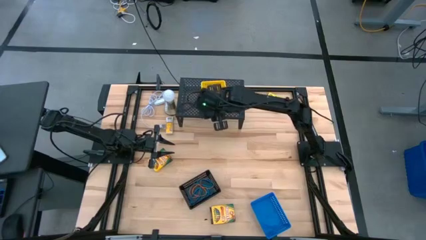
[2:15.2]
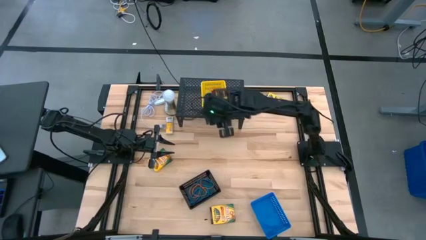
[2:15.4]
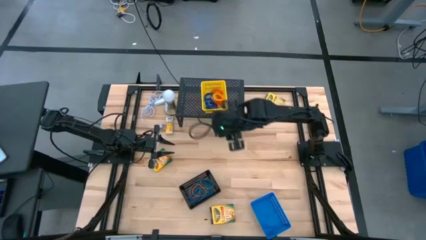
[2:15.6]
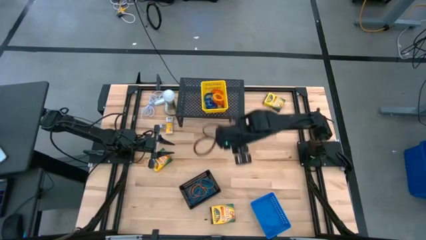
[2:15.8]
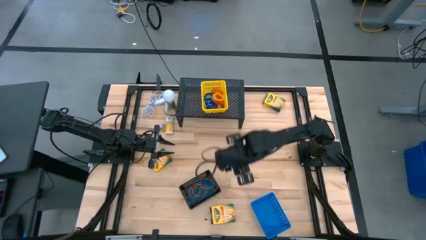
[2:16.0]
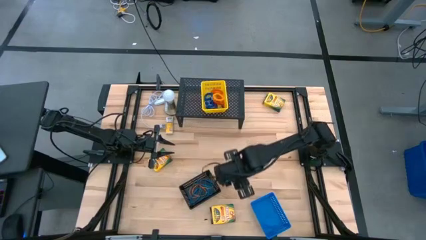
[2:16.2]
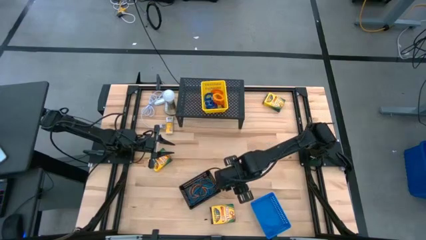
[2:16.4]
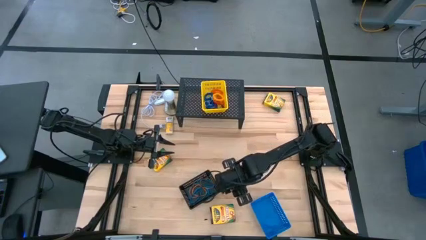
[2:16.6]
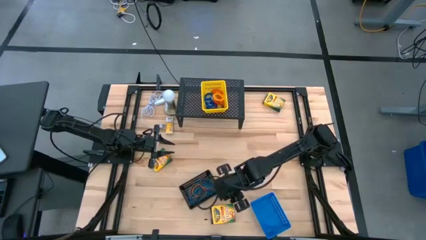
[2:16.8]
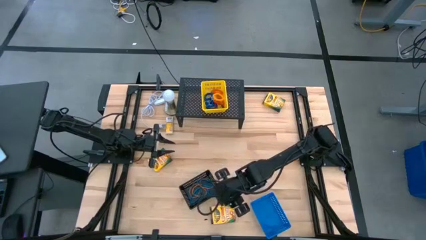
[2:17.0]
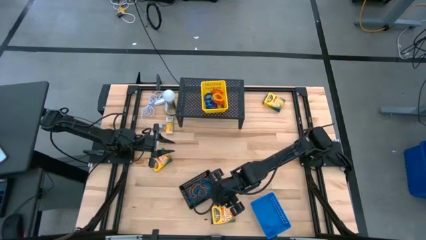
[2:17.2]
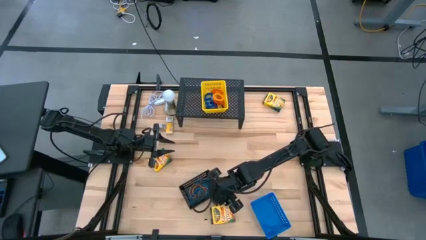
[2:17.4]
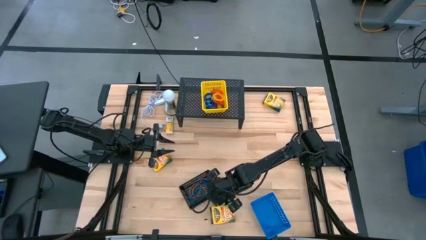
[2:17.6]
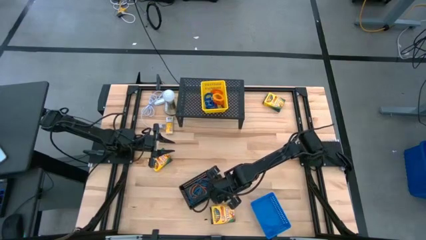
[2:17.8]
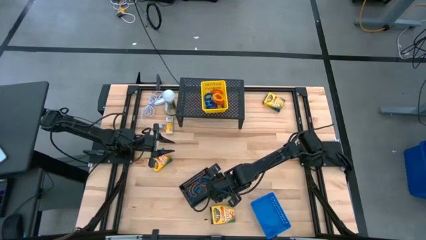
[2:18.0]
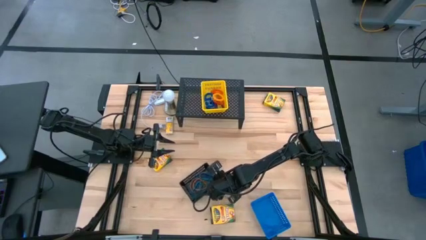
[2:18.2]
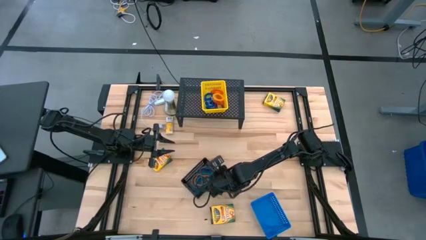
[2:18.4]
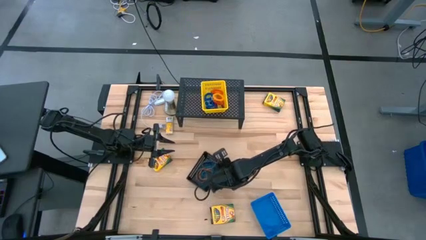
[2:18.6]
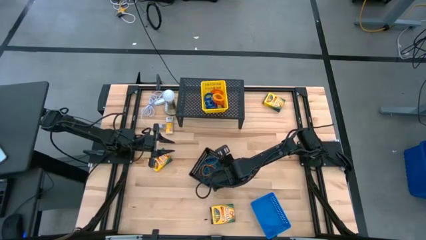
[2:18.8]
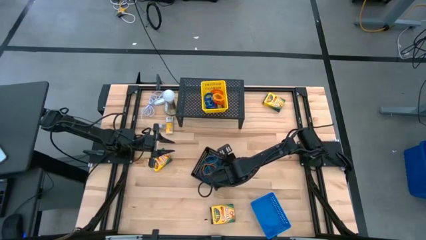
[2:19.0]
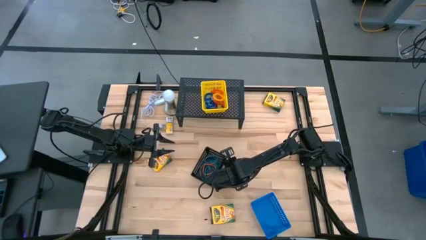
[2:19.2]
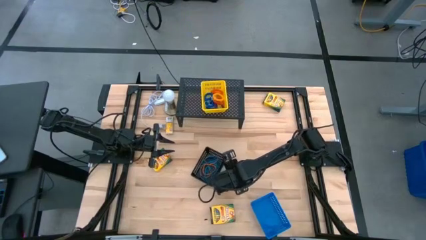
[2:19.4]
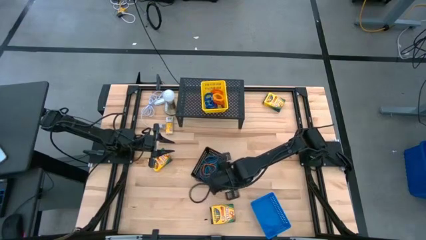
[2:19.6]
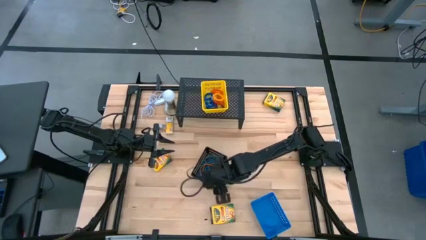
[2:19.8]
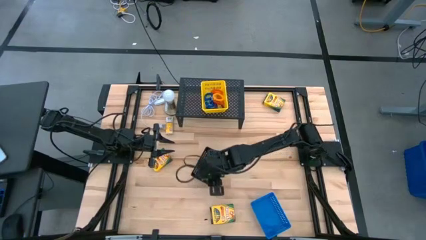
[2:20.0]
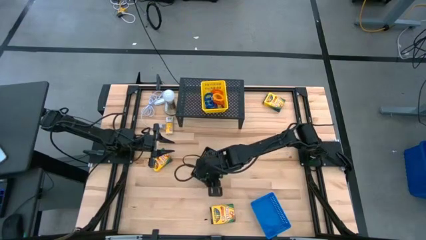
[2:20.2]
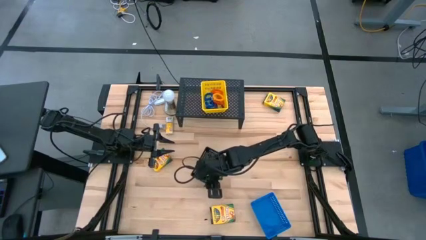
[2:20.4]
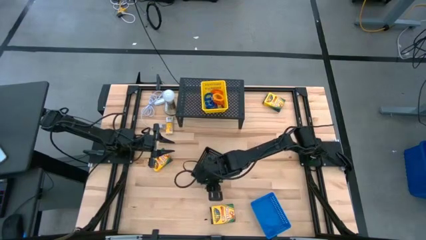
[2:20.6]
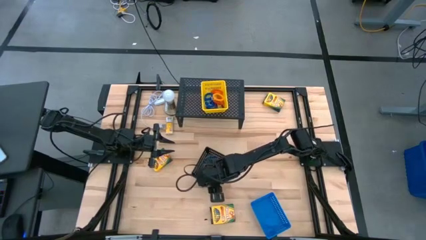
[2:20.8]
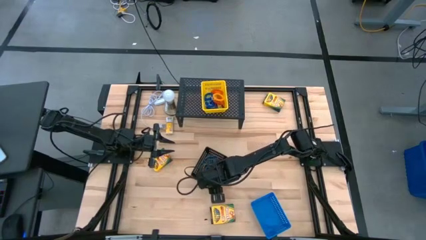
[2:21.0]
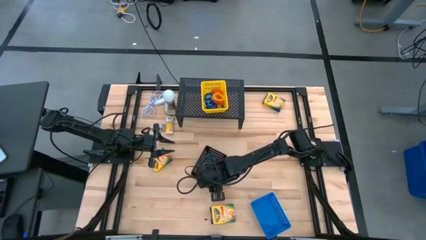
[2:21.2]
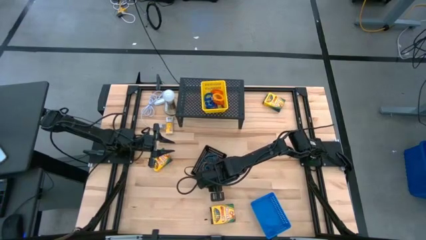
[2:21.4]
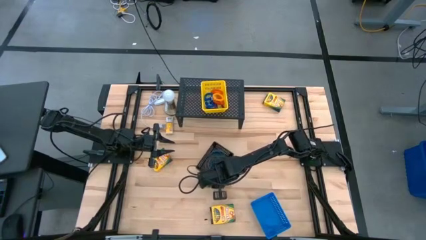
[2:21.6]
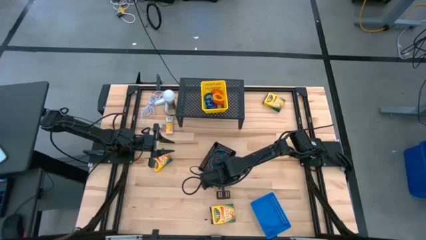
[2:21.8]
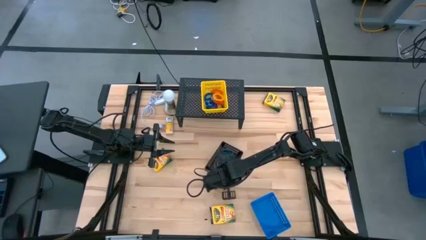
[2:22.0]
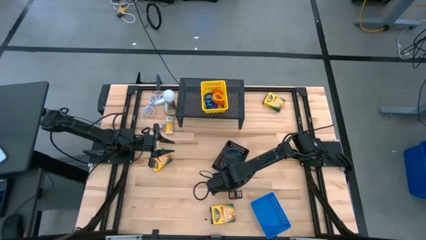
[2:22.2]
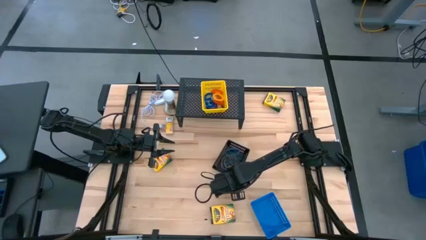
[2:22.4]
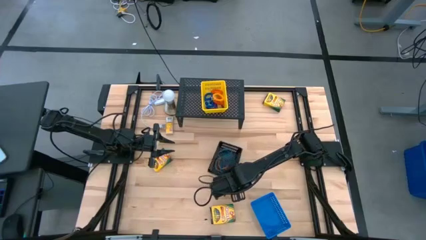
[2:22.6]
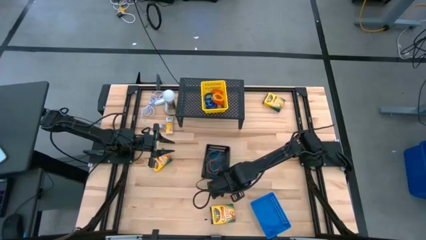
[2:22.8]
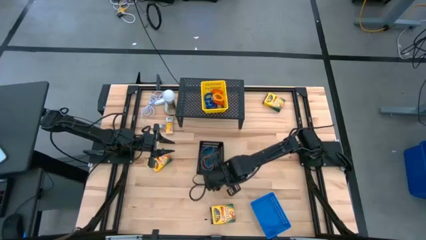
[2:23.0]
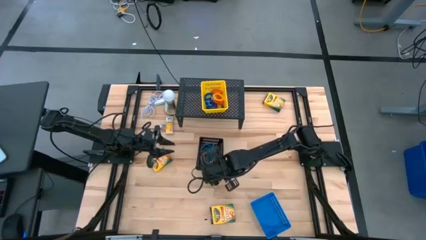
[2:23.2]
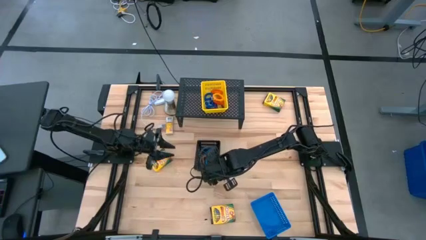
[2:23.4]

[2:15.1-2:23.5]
Task: Pick & Place Office Desk Supplies
Put the black basket on the shelf

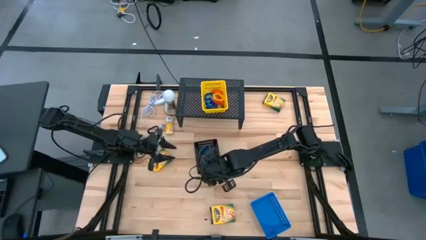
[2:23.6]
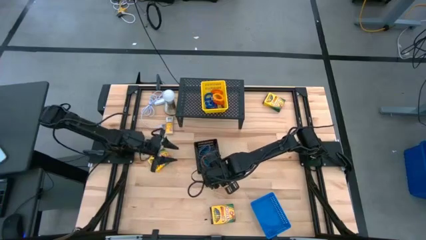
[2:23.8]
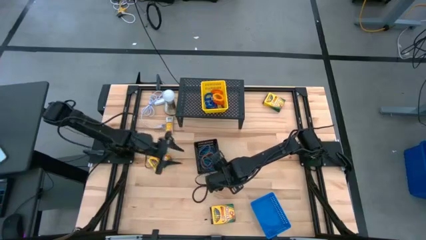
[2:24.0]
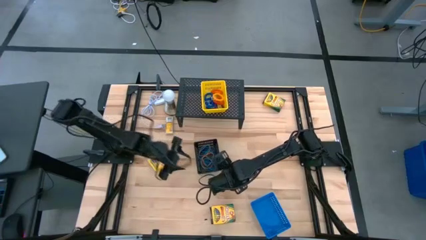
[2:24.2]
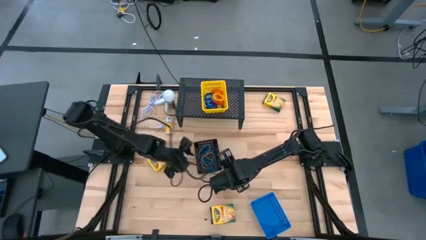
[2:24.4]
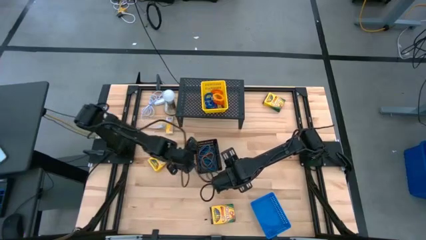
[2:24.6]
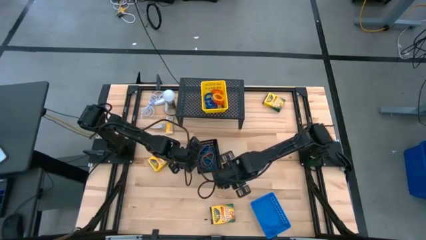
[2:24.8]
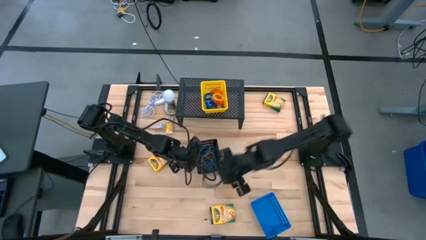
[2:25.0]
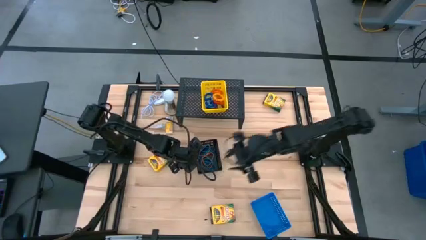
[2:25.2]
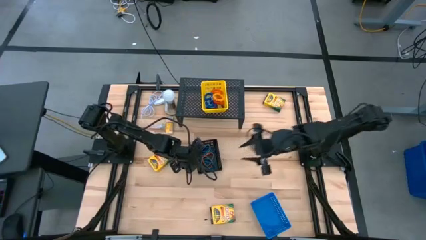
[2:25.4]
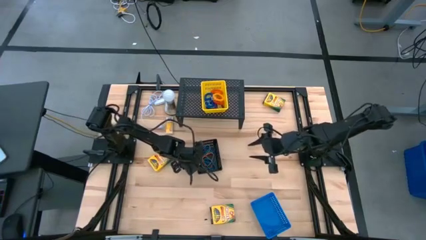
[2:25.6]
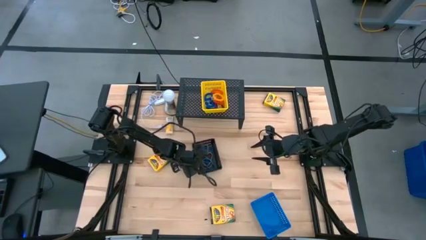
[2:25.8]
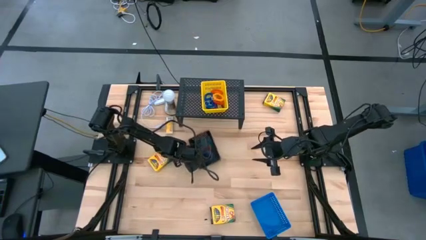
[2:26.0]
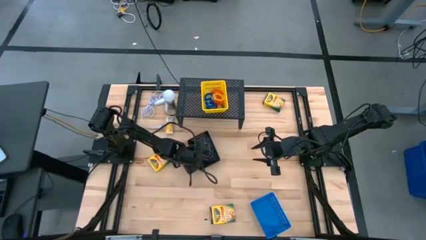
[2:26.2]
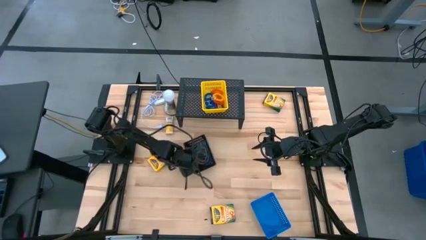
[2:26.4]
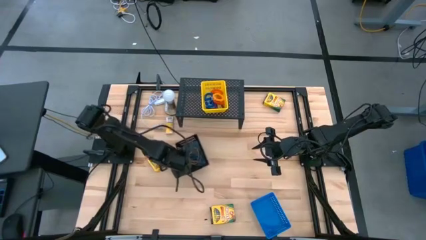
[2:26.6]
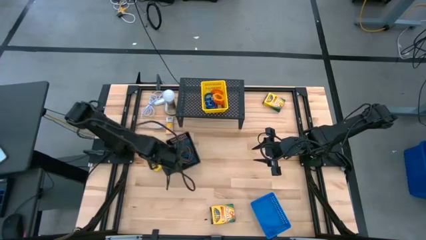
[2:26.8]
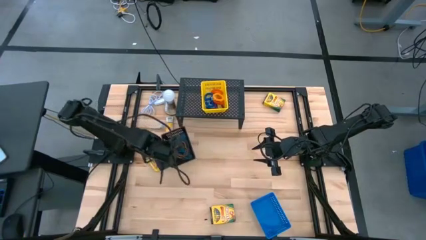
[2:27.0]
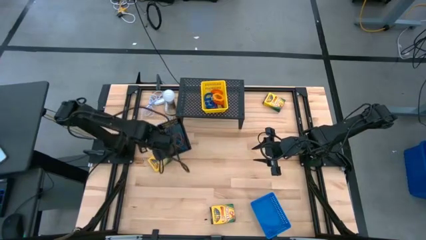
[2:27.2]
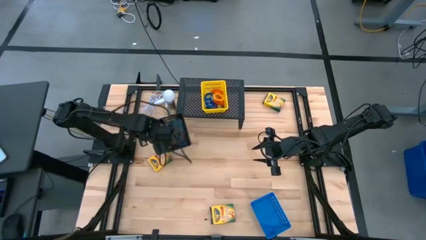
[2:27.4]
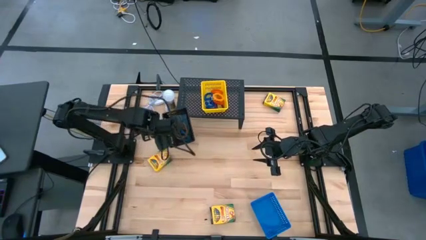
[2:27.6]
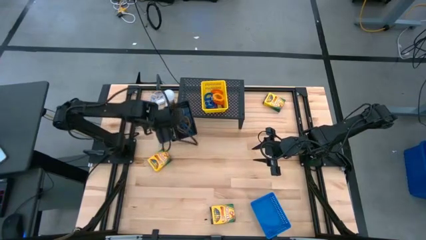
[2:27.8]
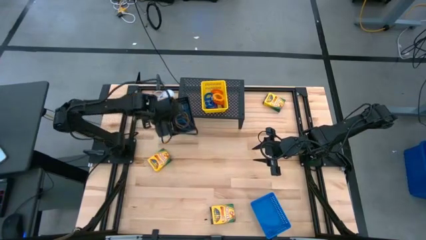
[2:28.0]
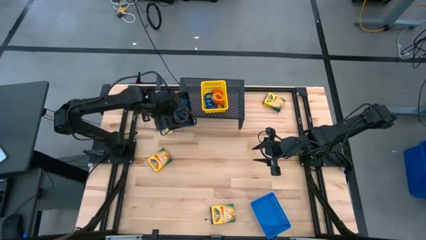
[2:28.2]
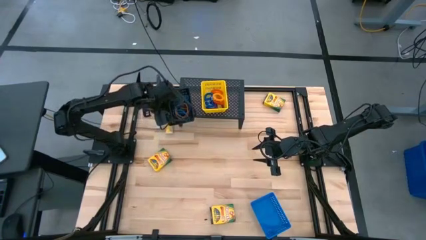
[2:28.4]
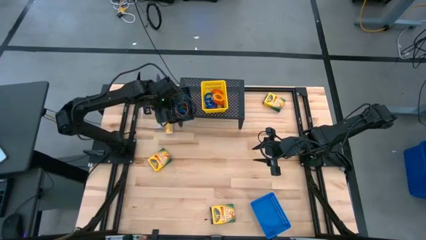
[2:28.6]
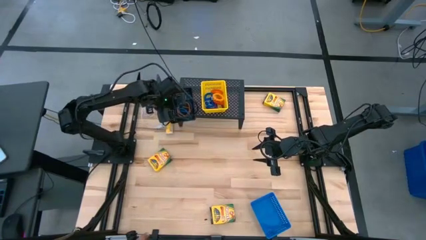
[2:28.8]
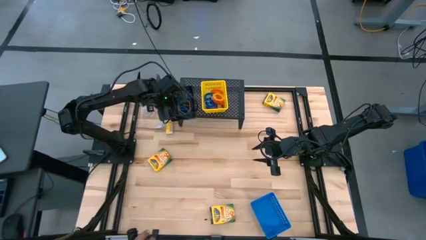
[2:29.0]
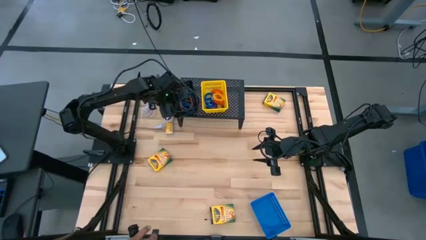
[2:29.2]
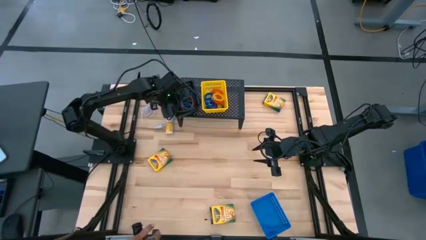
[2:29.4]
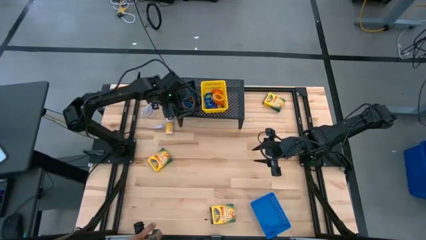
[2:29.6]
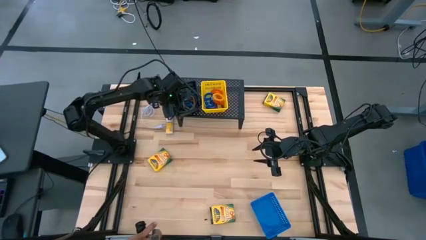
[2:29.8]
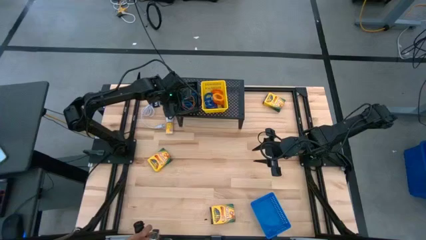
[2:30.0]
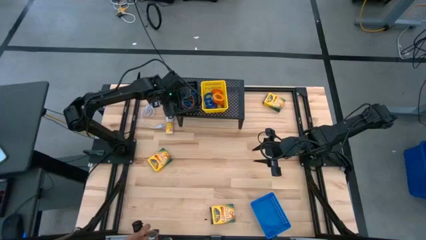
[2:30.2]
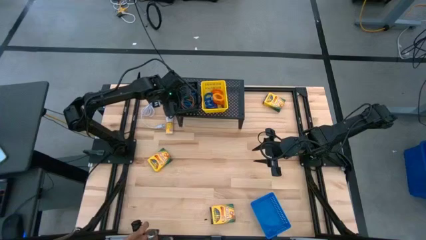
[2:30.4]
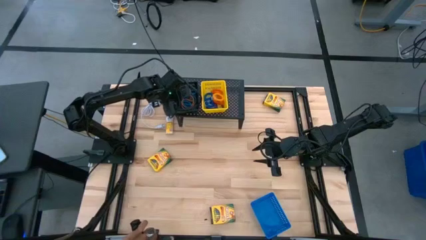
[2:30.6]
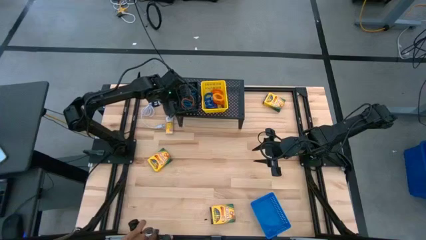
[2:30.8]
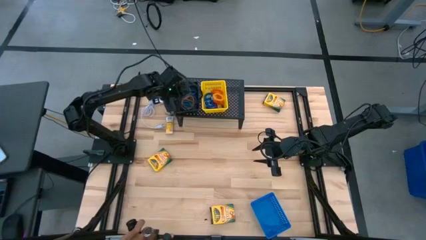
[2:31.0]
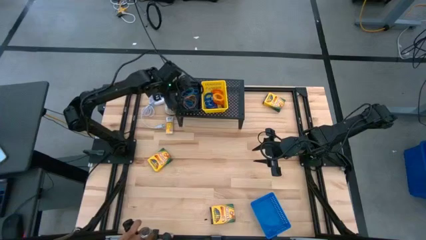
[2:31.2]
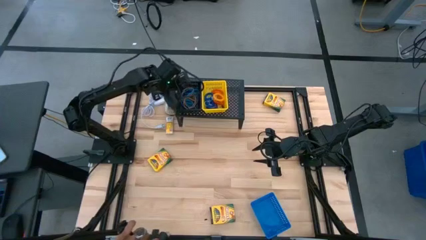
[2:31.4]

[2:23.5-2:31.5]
Put the black basket on the shelf
